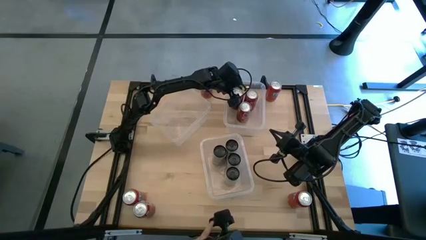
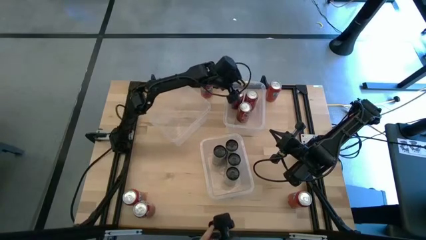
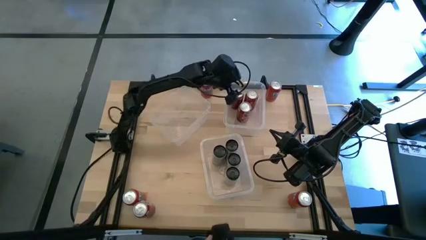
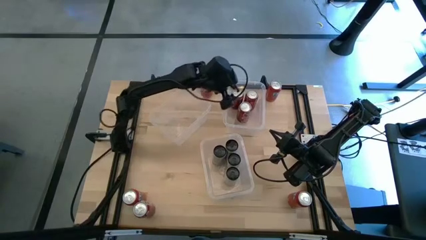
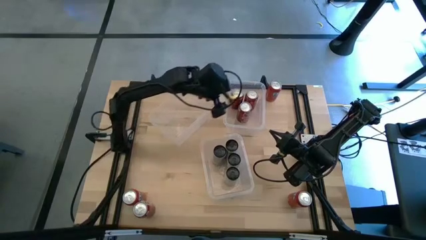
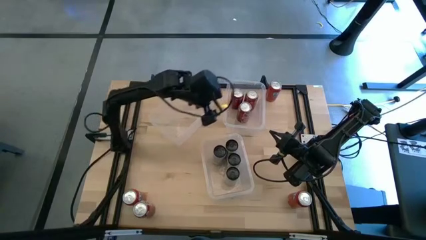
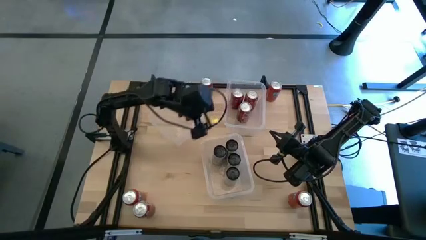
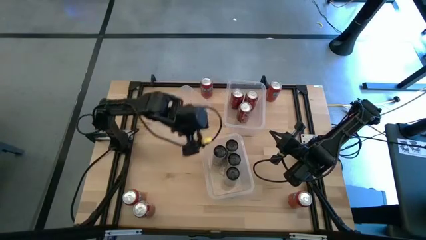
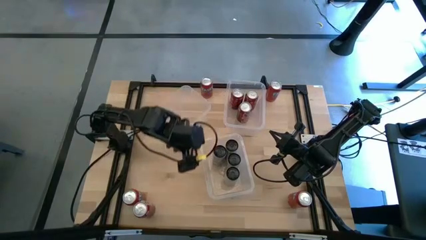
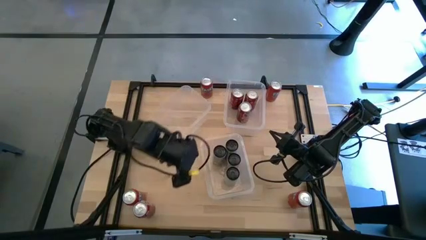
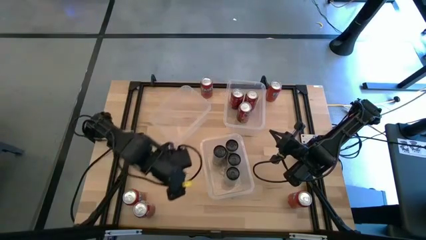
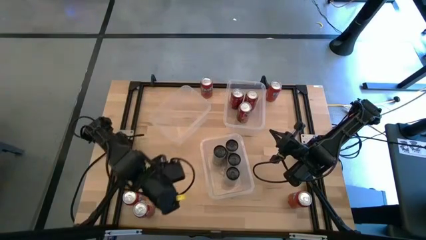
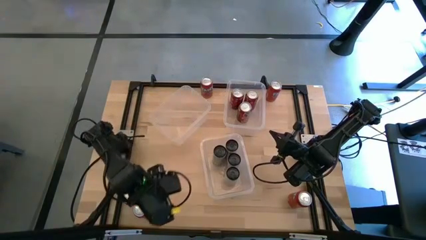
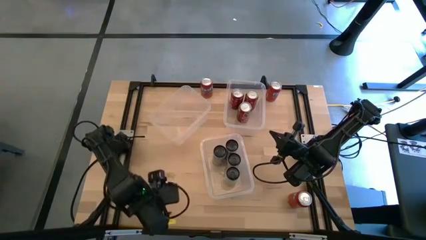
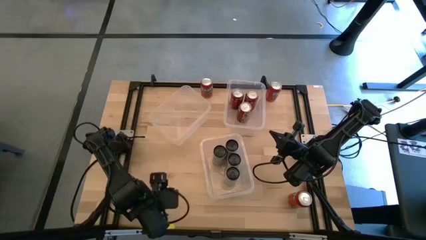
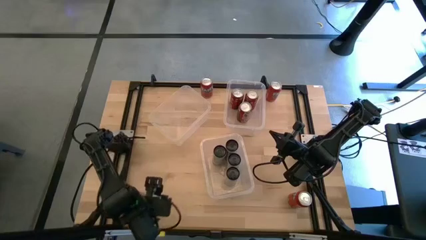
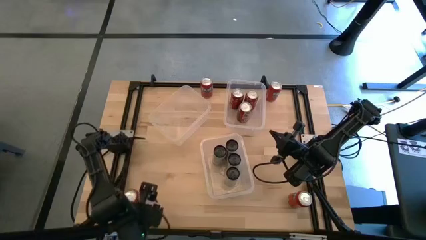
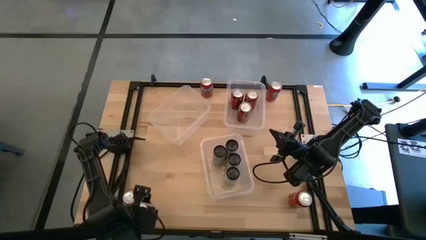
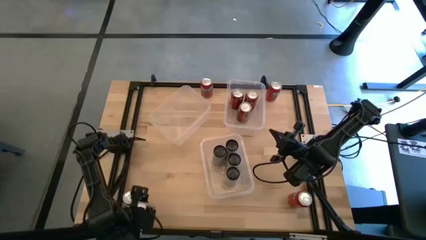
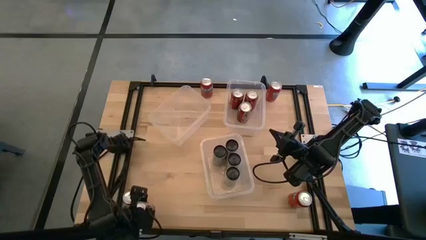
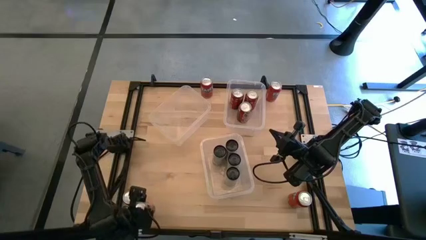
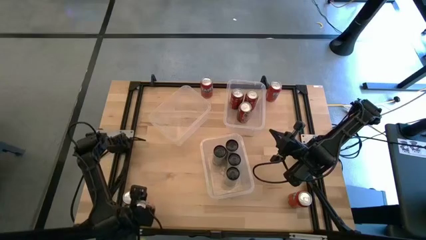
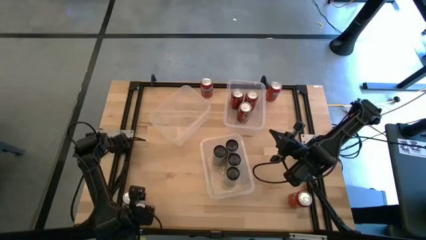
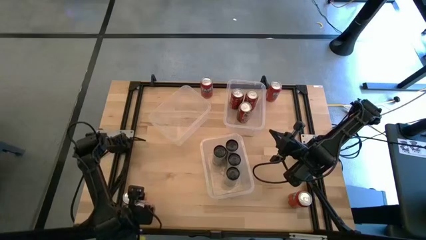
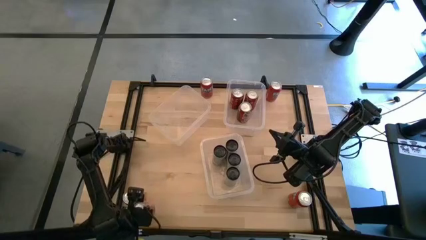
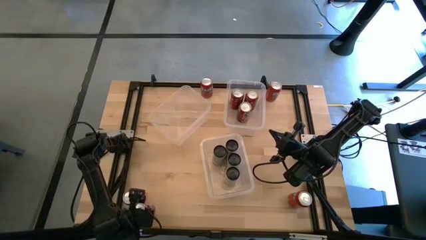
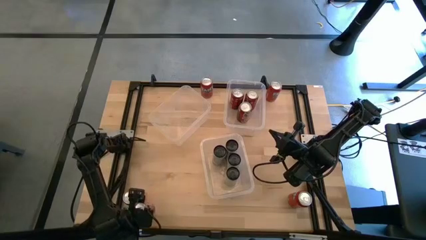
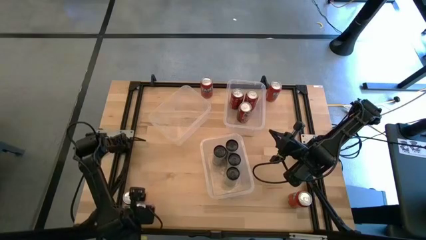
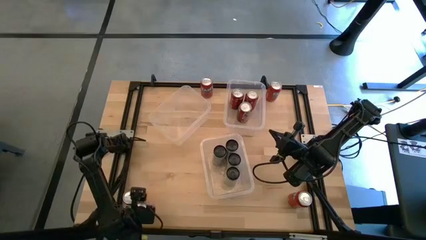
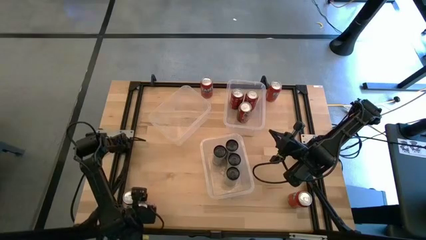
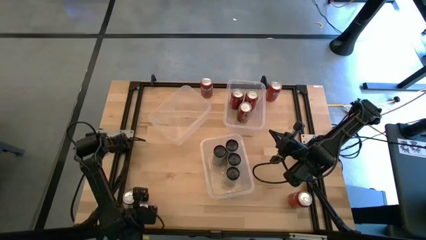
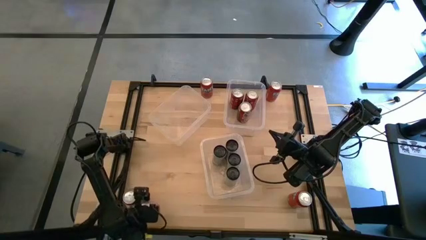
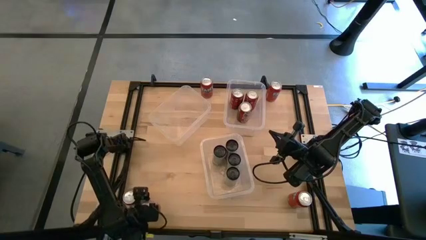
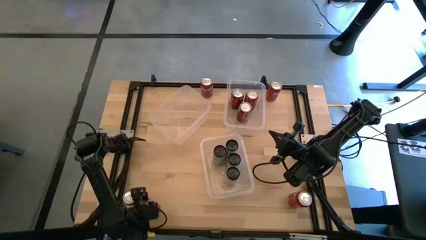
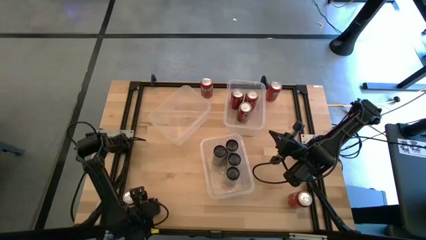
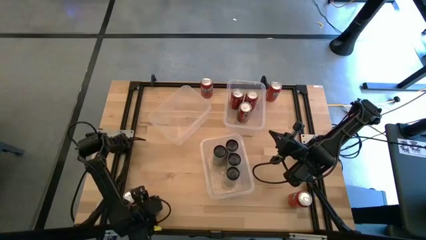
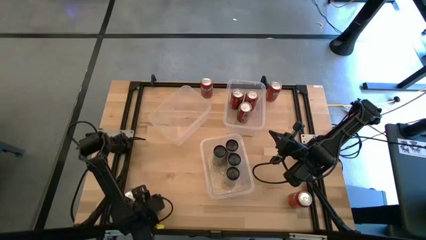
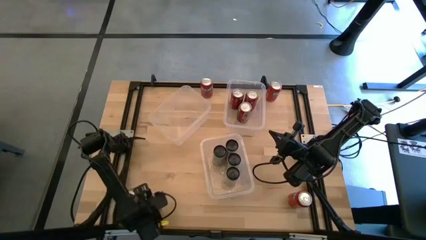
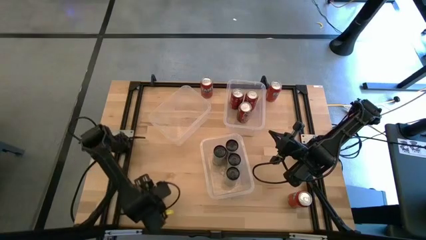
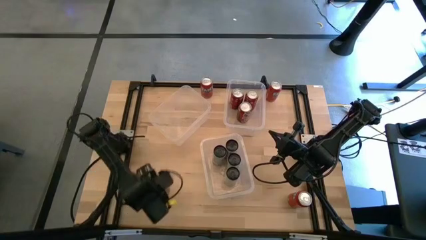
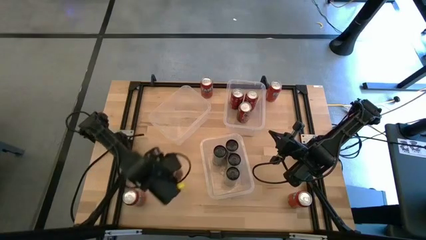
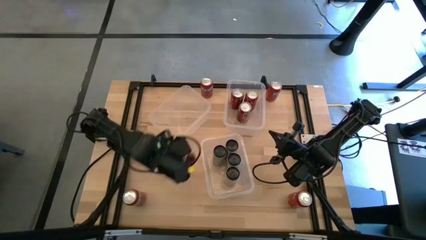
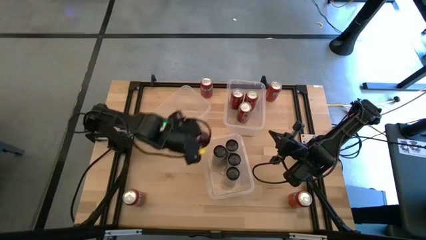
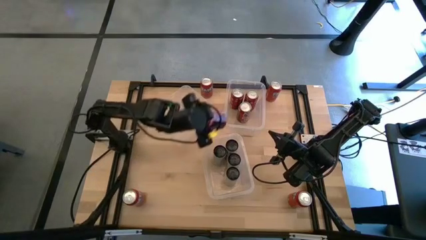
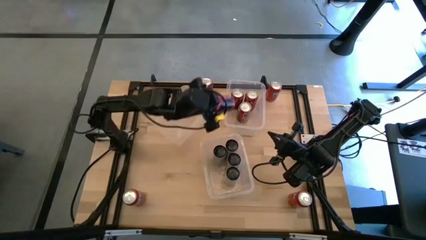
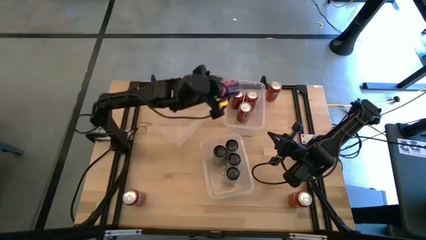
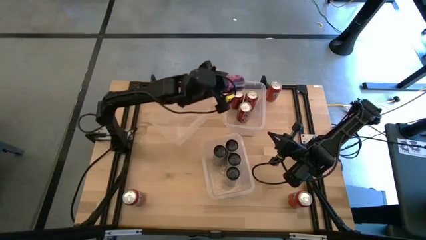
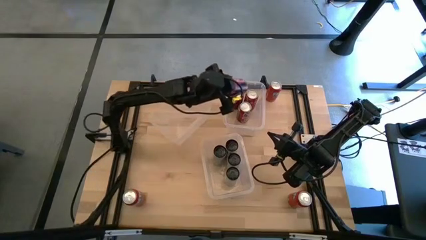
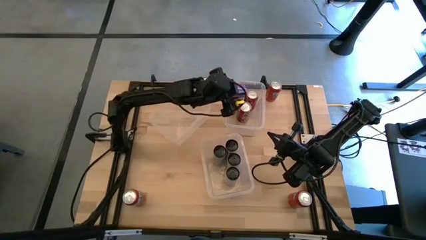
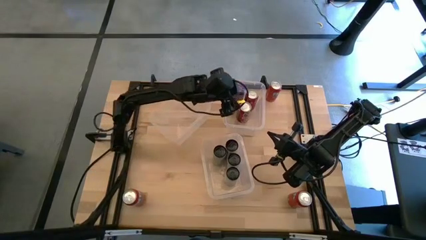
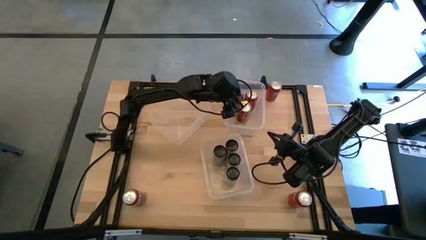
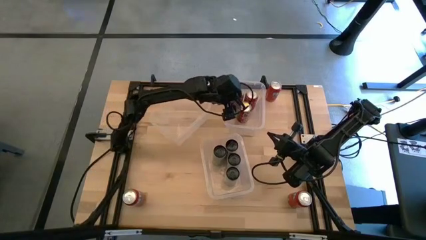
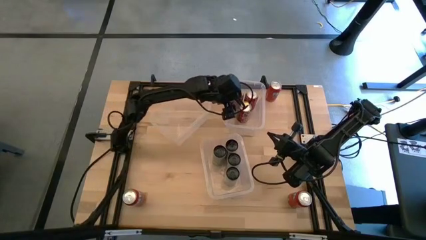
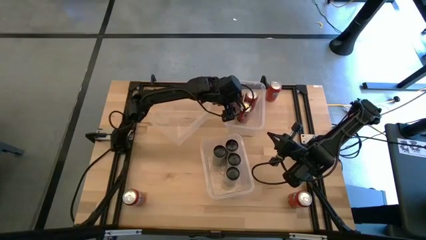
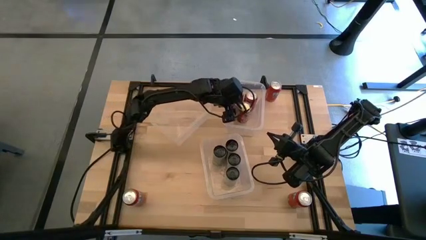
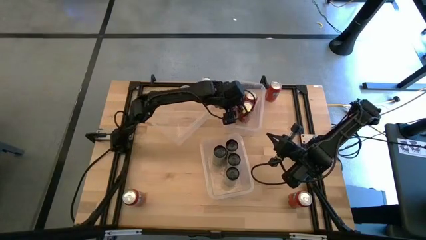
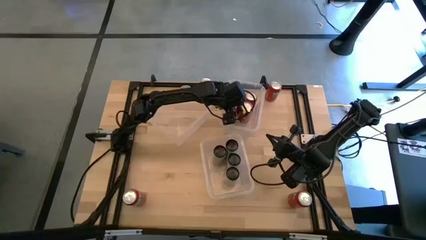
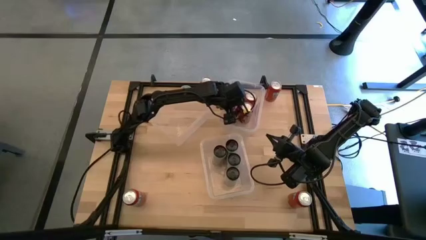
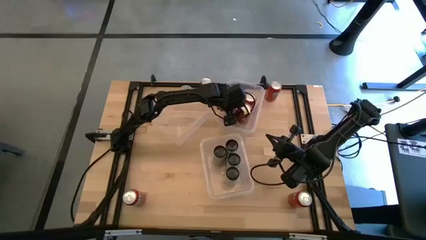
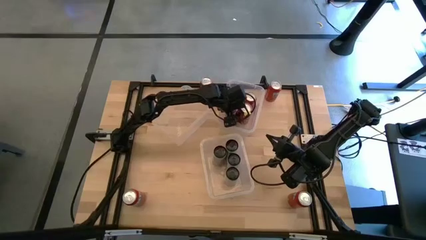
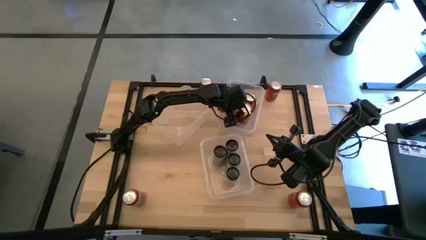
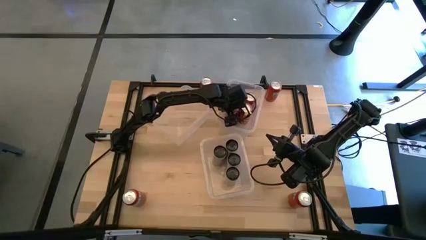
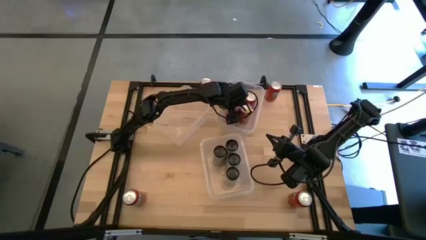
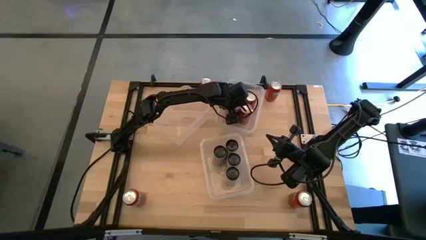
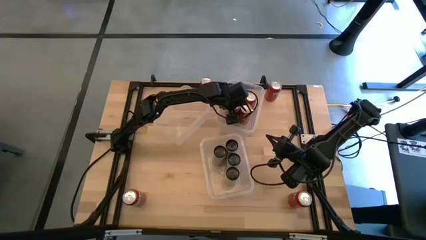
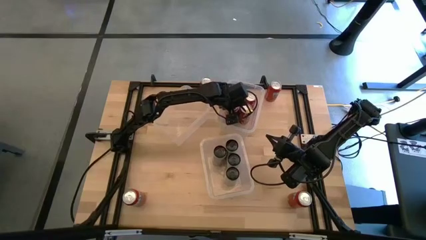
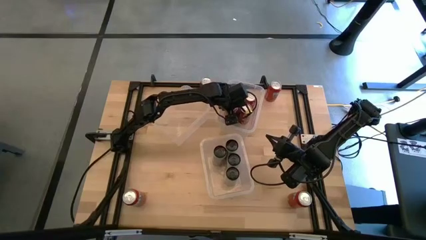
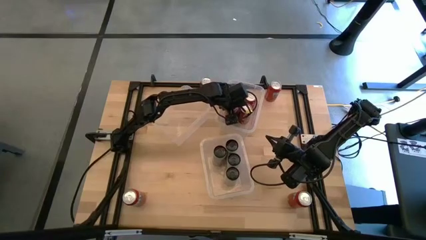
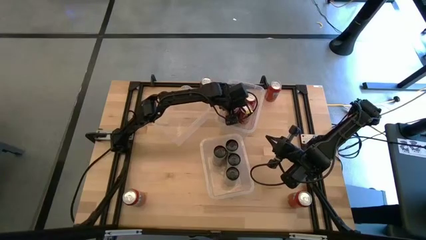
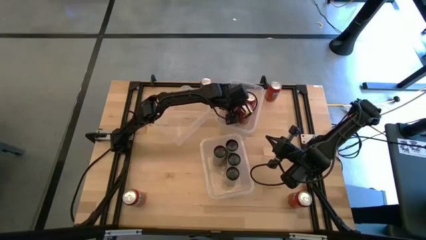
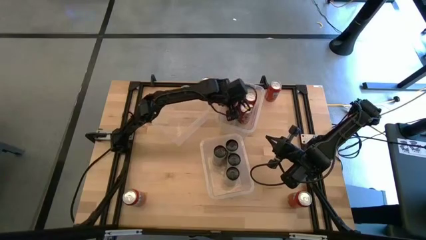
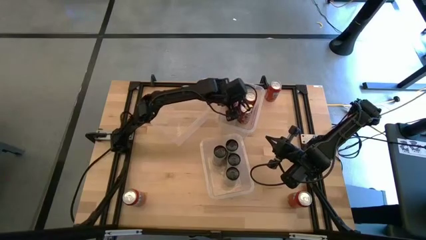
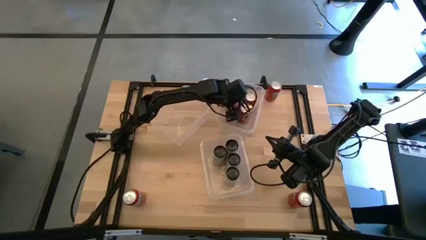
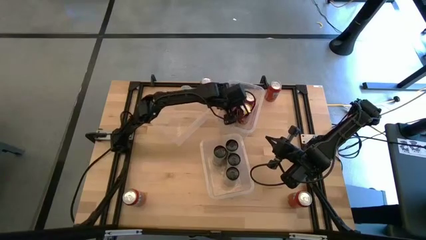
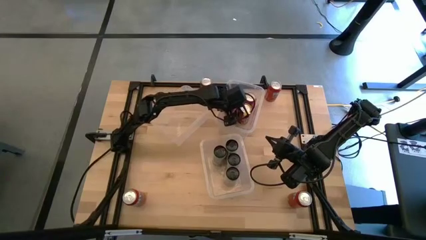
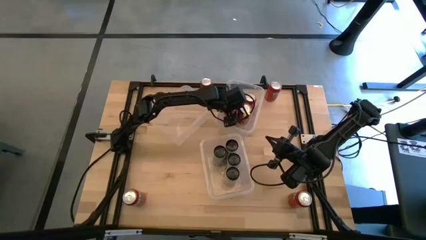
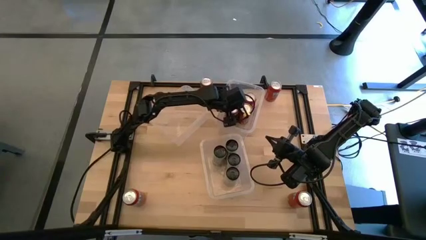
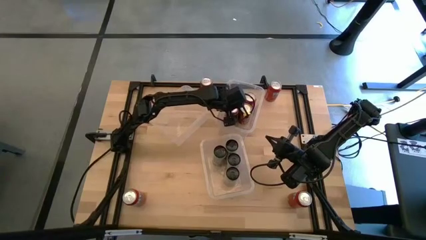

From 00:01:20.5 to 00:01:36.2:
Task: Sort soda cans
Put the red/white soda can into the right transparent bin

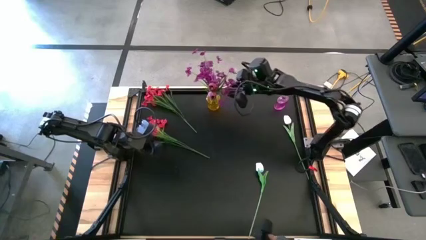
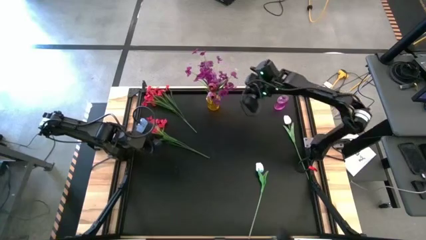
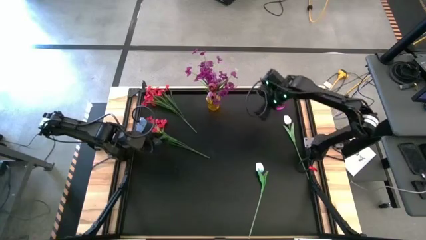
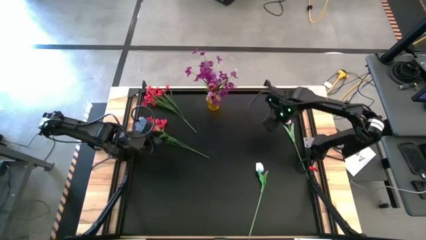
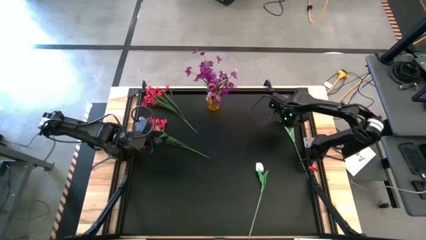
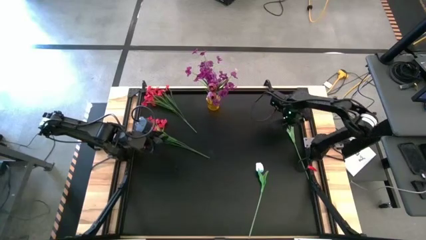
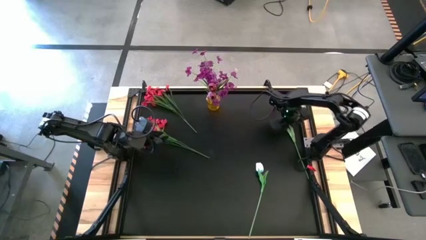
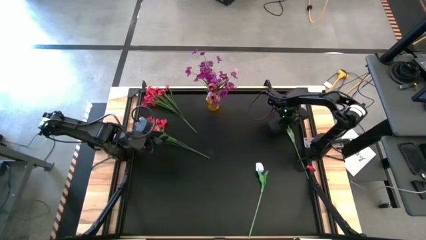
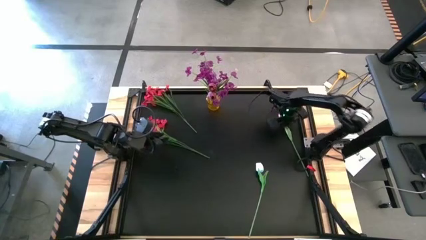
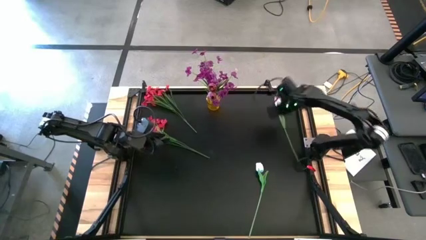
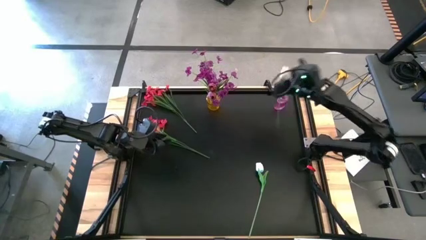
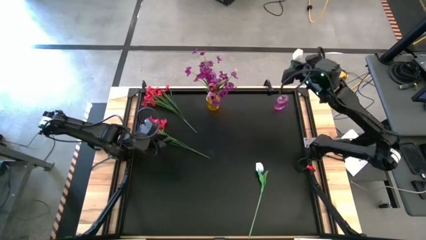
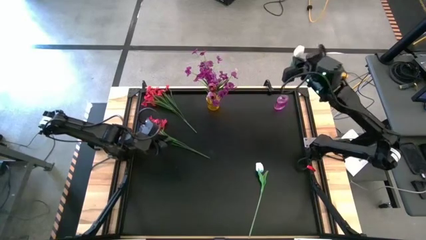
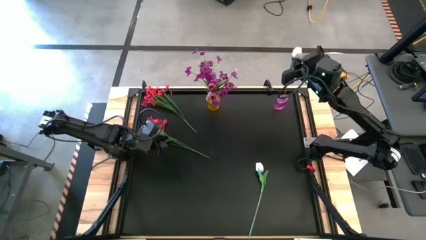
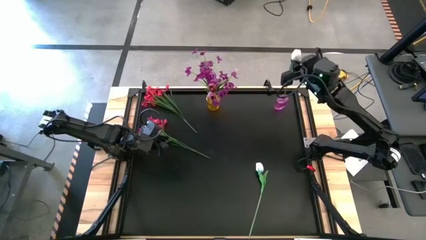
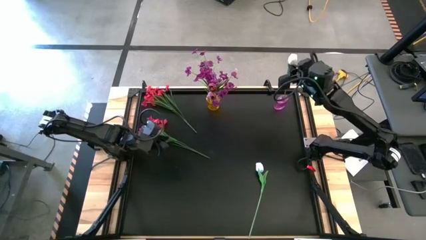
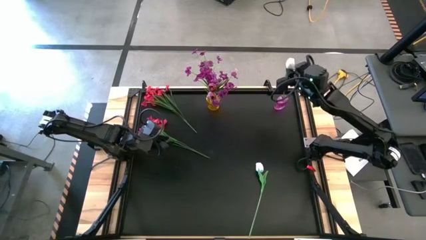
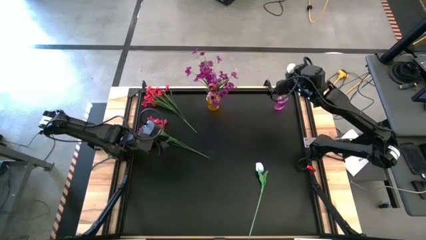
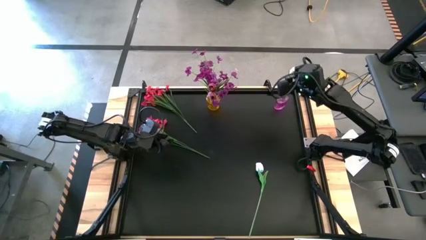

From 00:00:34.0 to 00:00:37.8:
Task: Sort flowers into vase by color
Put the top white tulip into the violet flower vase
